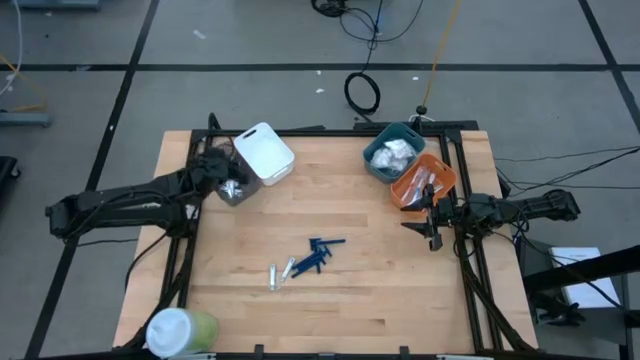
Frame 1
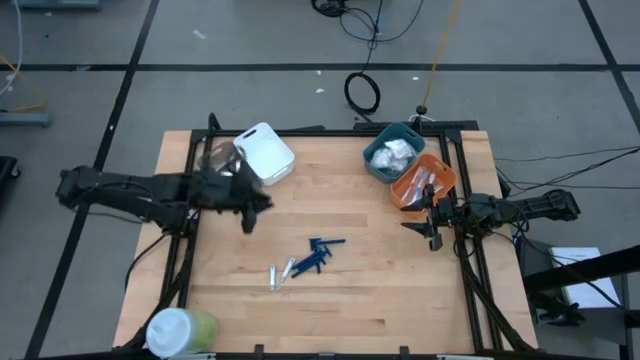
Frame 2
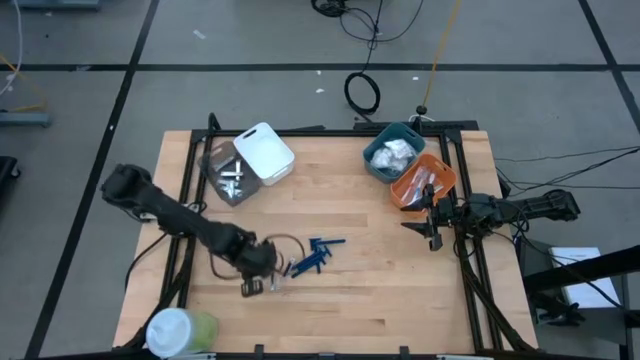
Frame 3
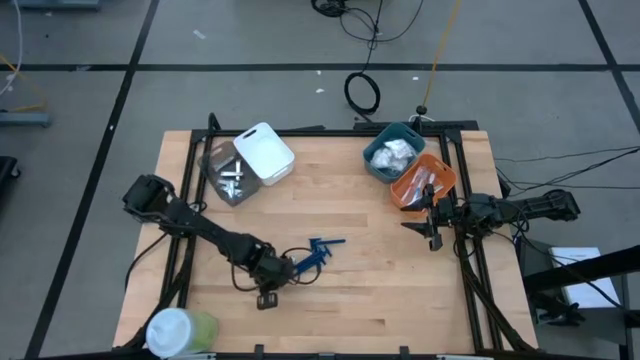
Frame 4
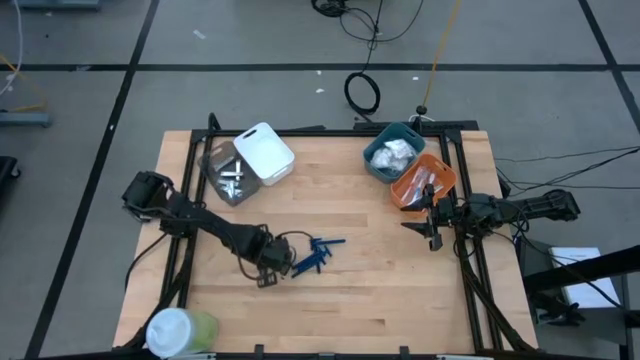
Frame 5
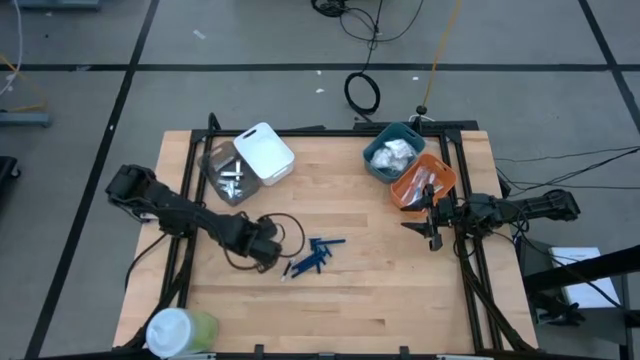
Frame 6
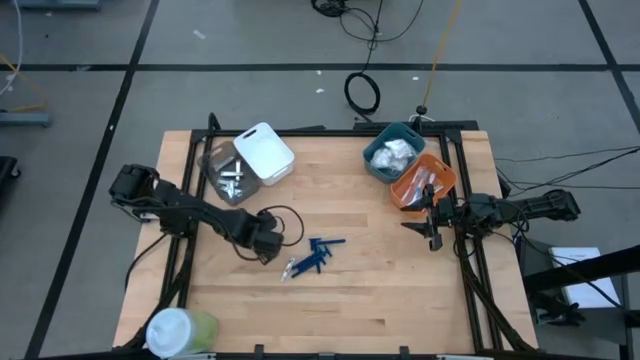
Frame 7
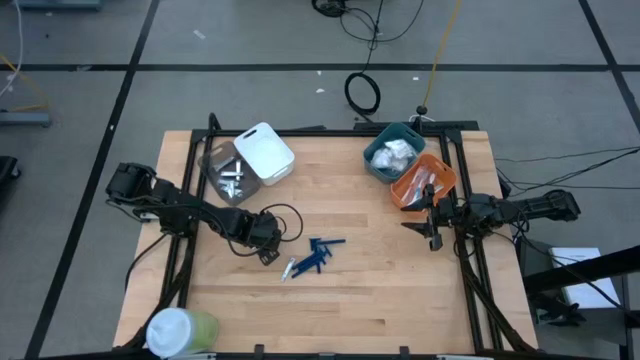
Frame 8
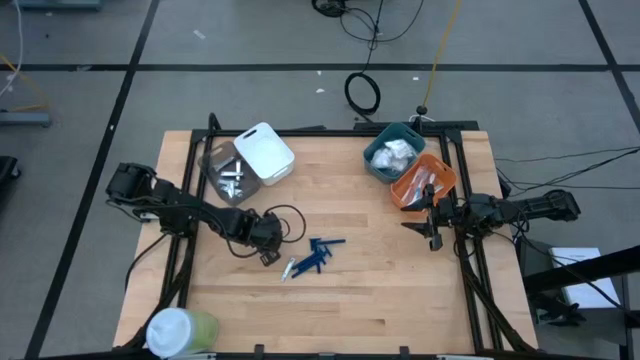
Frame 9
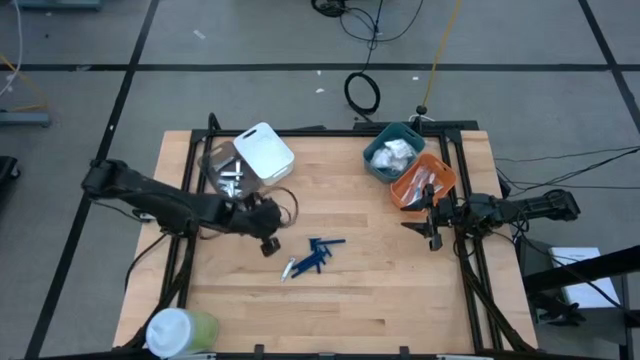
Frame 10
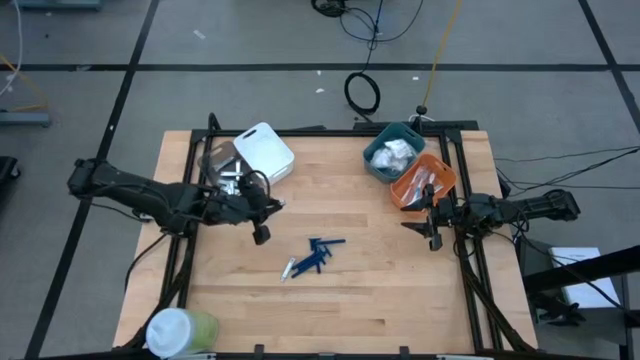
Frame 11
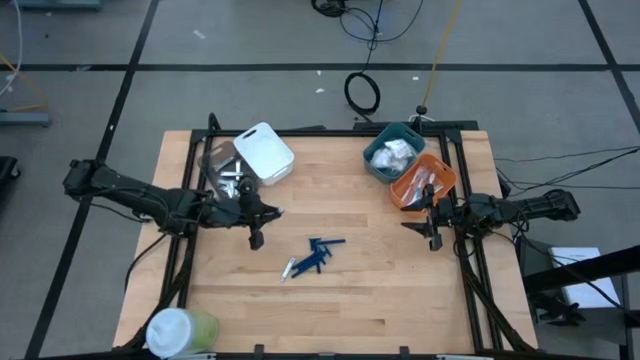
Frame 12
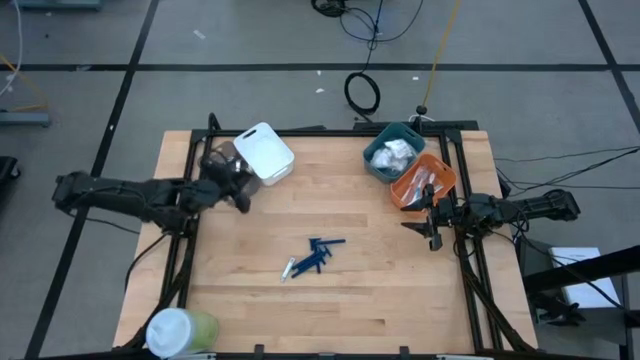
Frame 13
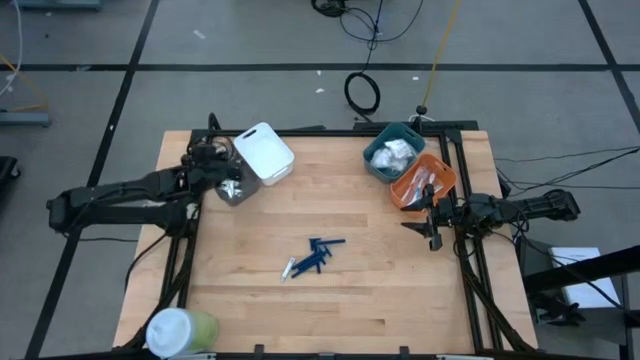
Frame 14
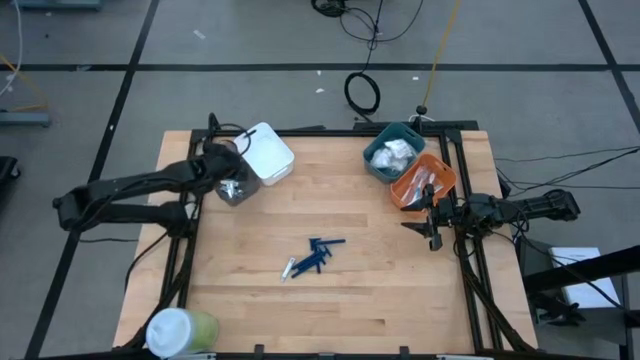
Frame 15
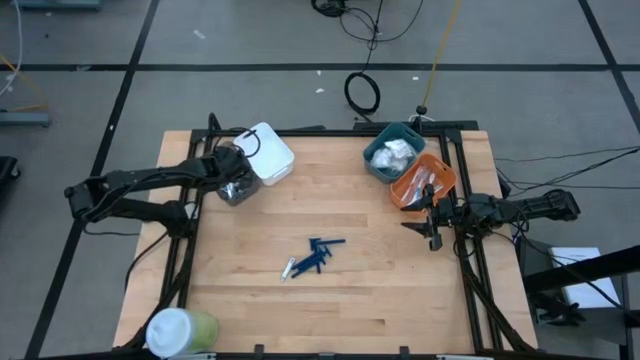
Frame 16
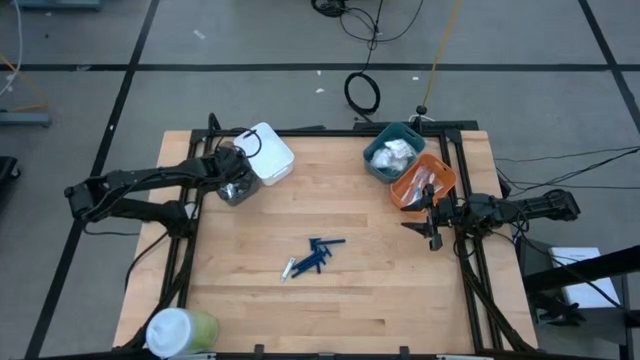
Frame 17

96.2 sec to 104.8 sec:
Task: Pick & Place Travel size toiletries
Put the left silver nail cutter into the black bin

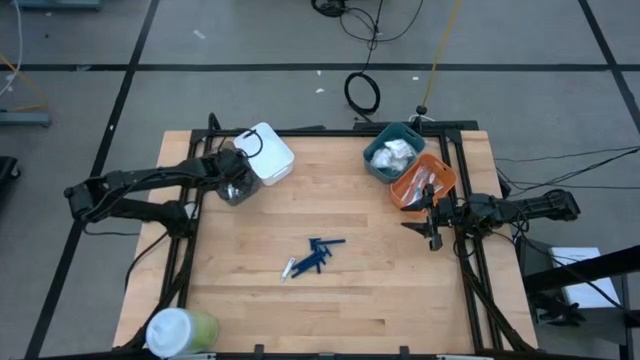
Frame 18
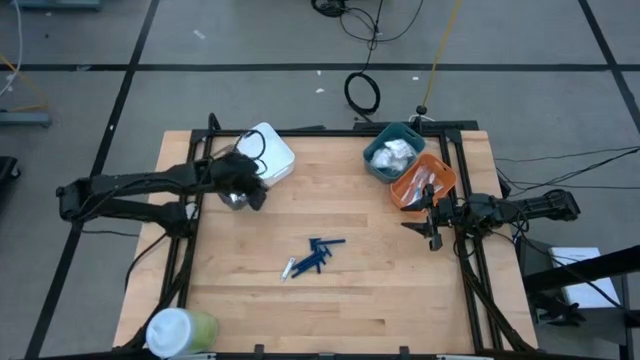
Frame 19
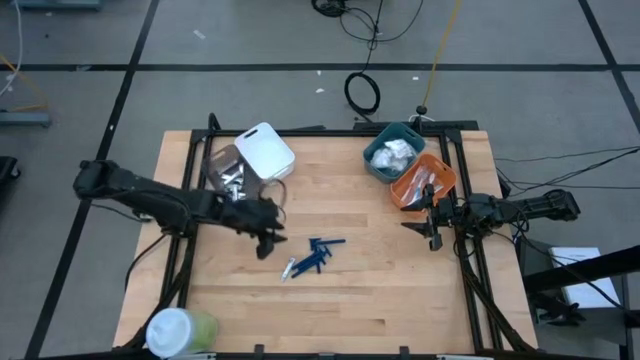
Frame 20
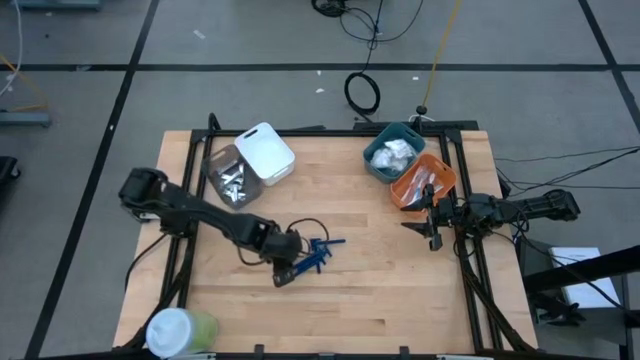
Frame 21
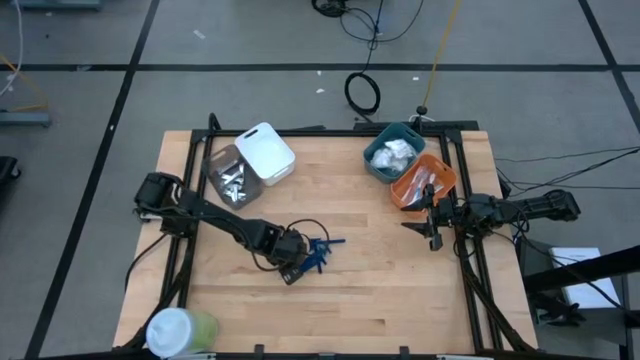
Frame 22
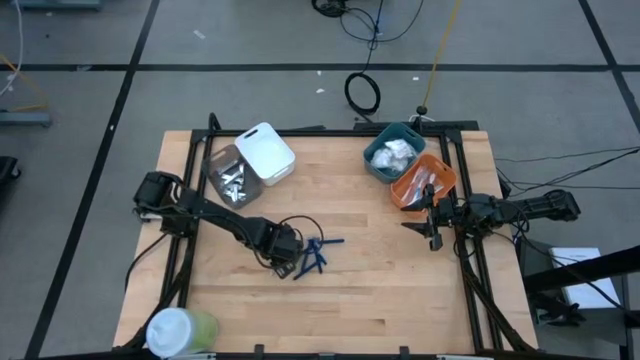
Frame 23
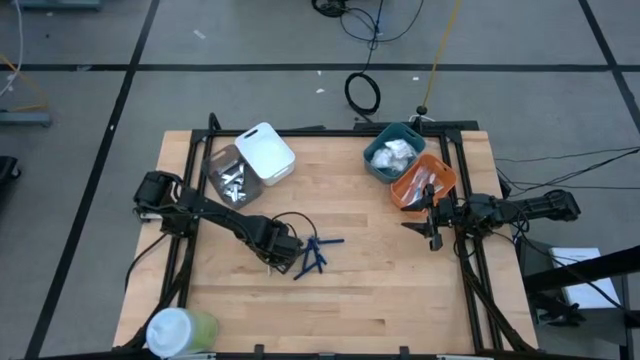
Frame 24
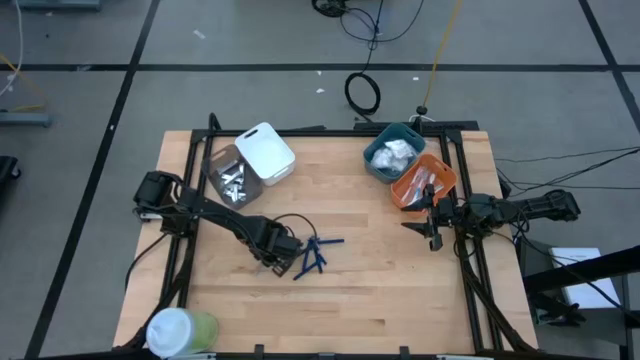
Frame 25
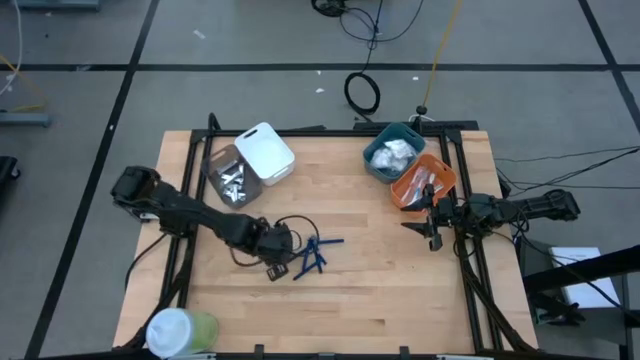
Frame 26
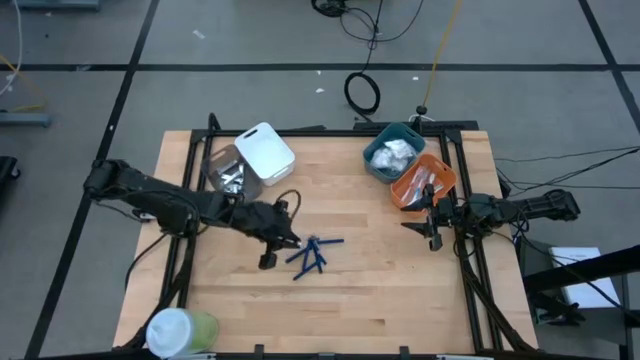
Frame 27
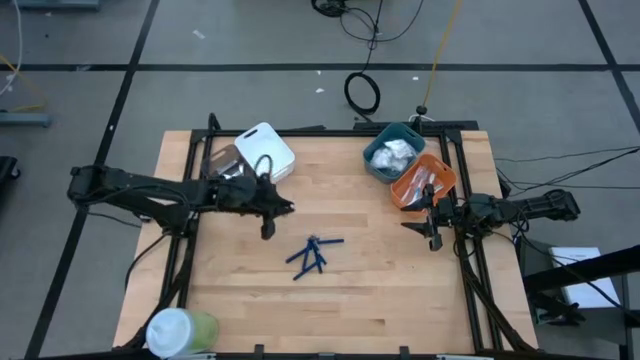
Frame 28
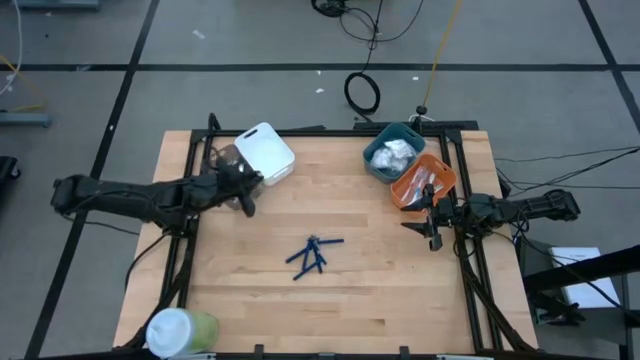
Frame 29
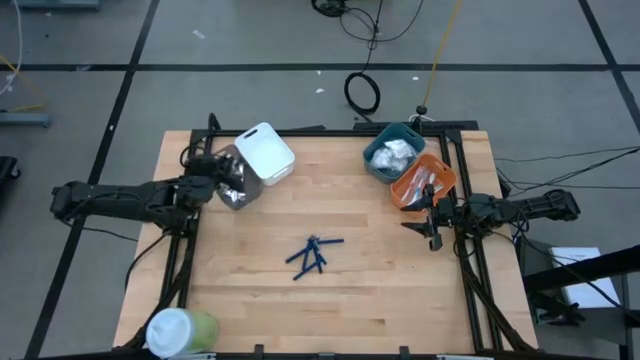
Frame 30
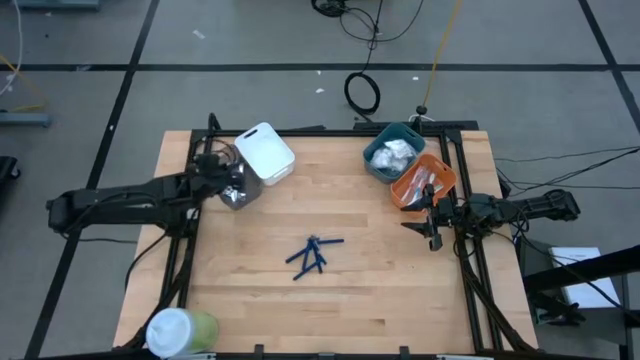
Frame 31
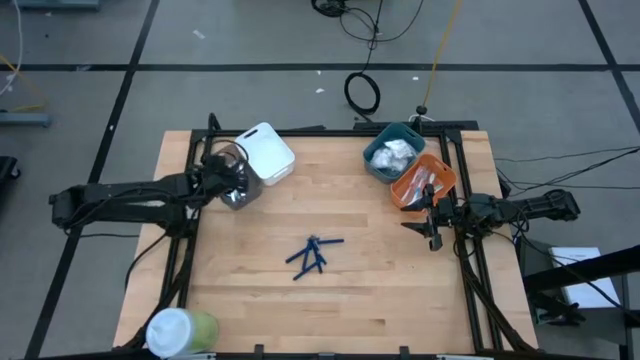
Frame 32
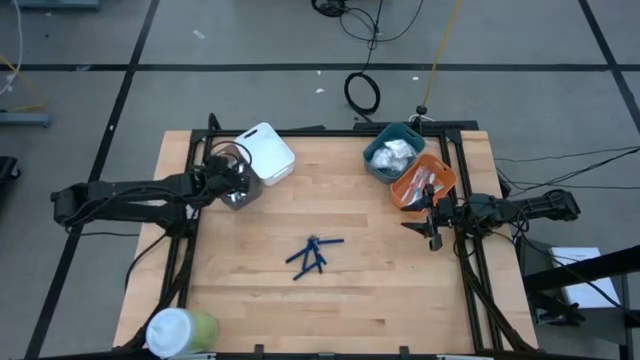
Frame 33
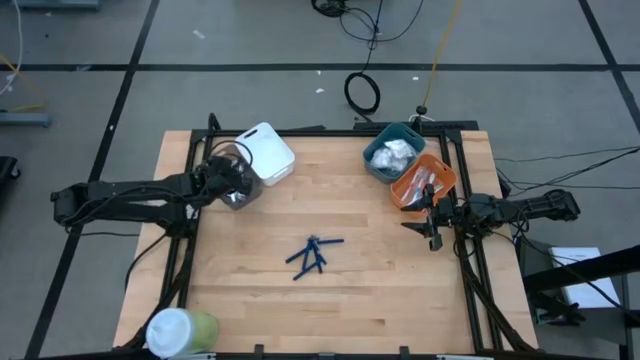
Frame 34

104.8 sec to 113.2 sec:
Put the silver nail cutter into the black bin

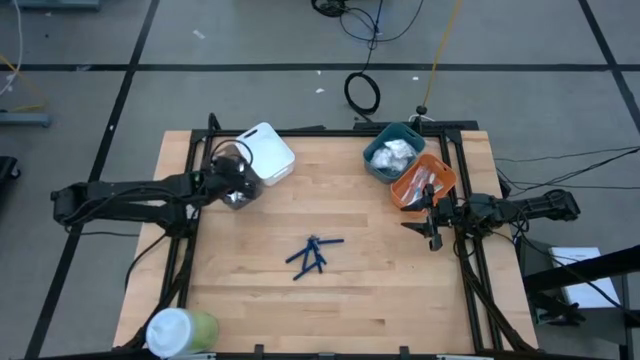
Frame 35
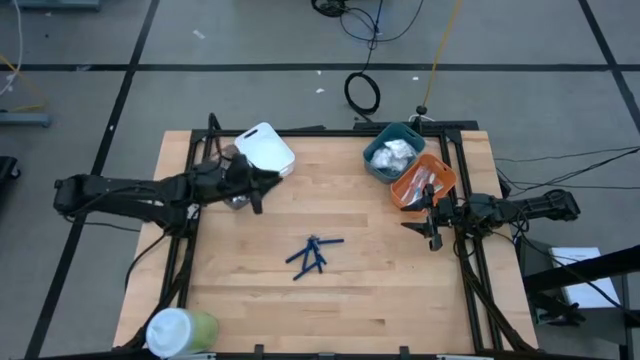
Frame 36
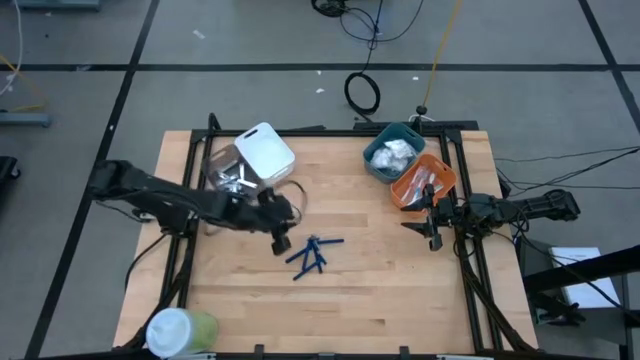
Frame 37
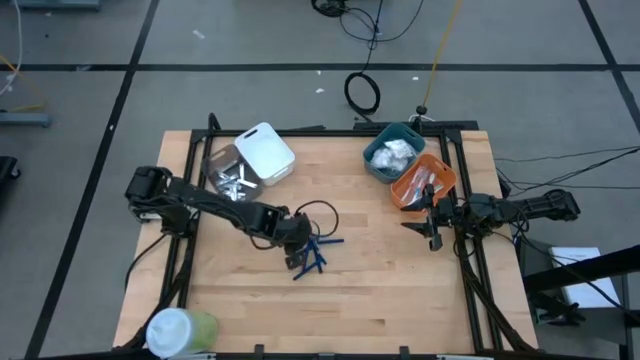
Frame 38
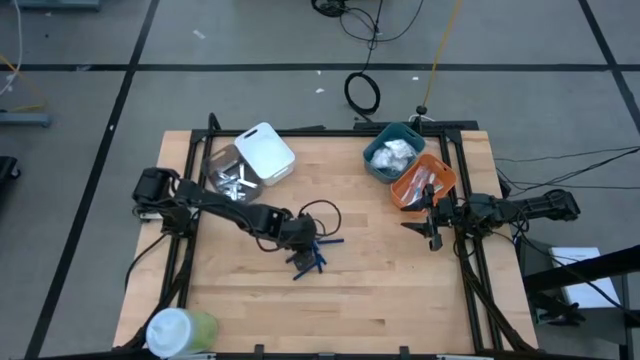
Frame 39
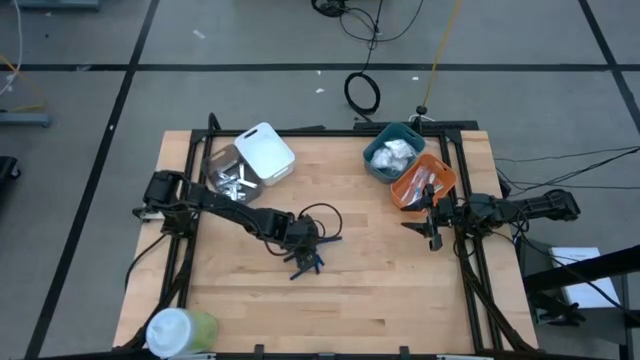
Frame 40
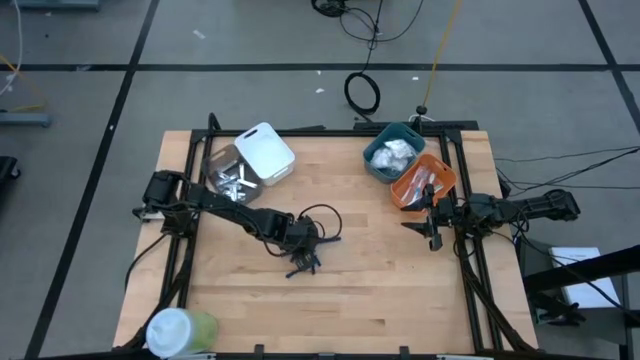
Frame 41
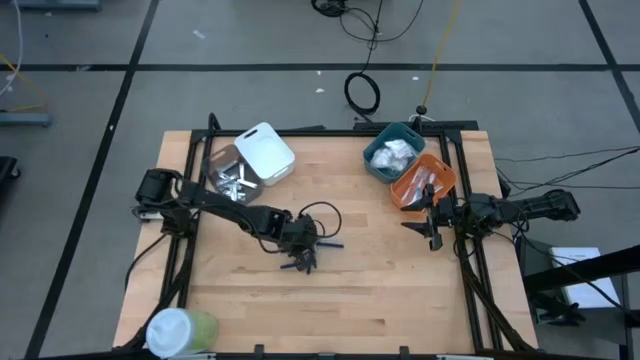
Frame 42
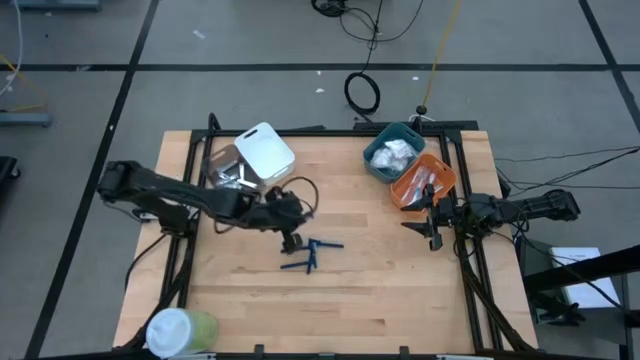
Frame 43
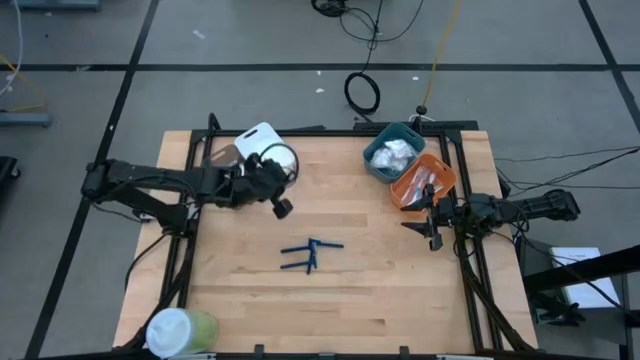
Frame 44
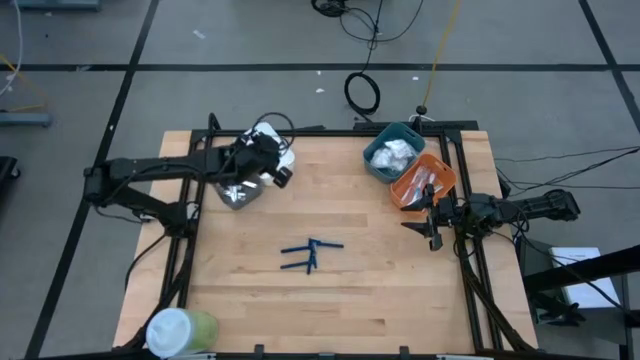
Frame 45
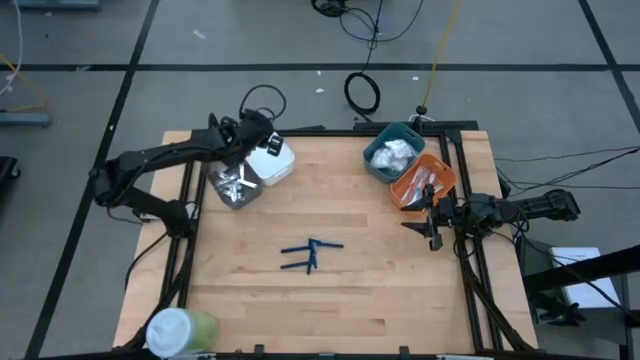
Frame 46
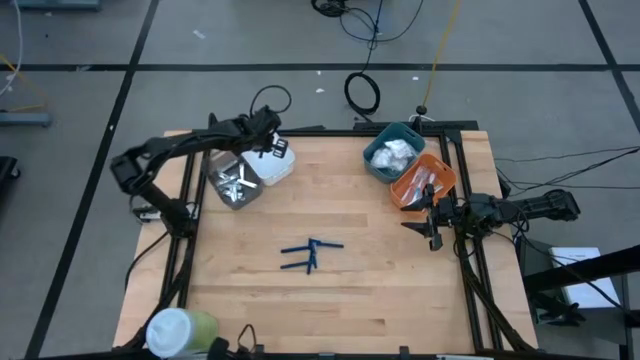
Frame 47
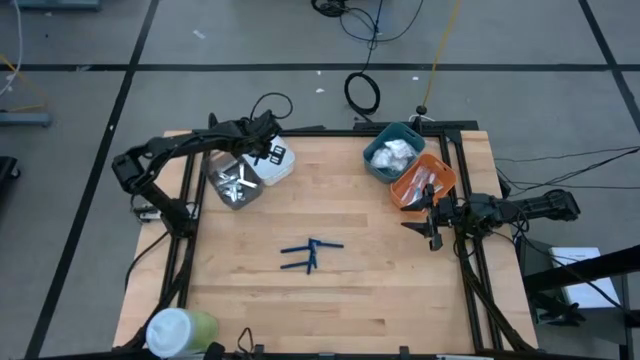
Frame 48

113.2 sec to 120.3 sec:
Put the blue razor into the white bin
